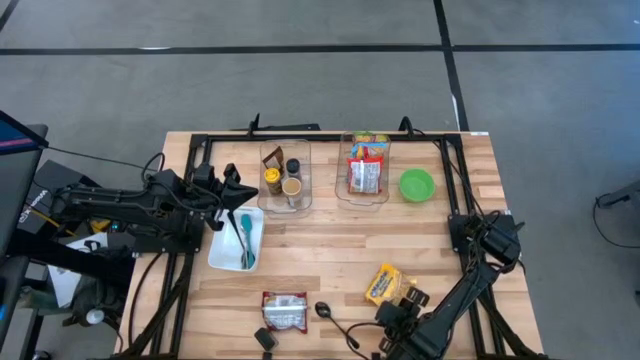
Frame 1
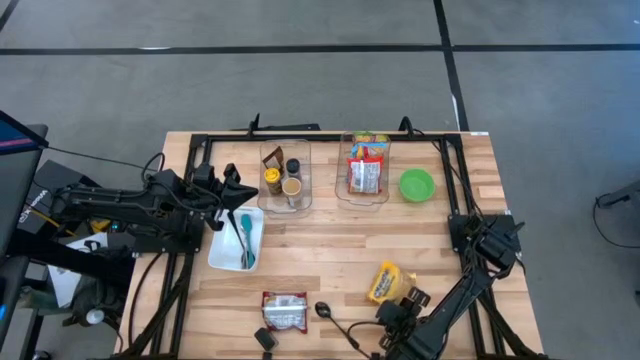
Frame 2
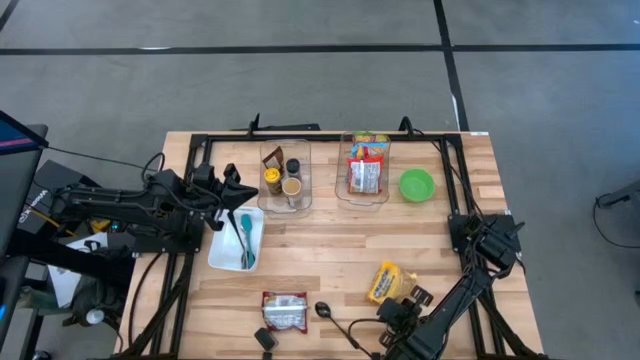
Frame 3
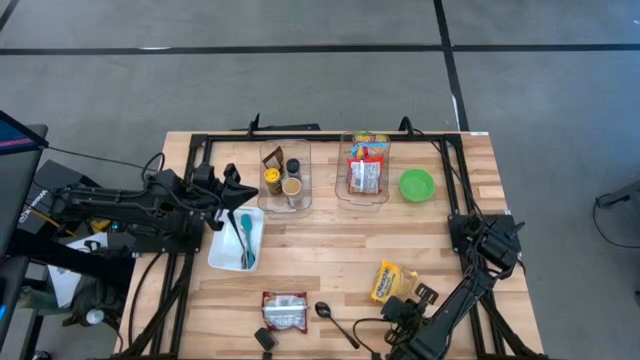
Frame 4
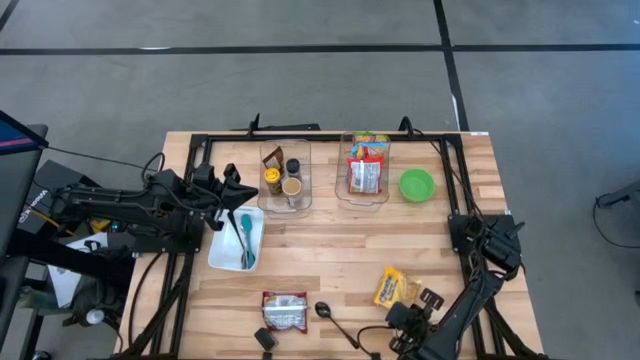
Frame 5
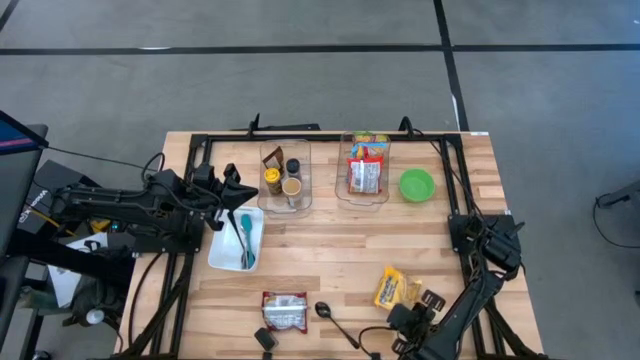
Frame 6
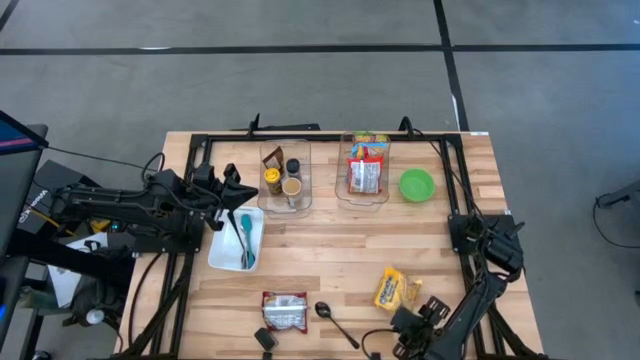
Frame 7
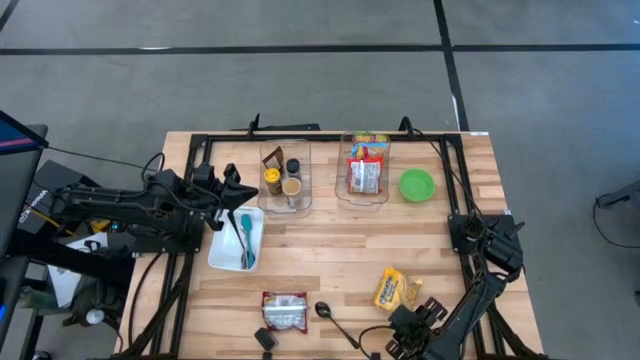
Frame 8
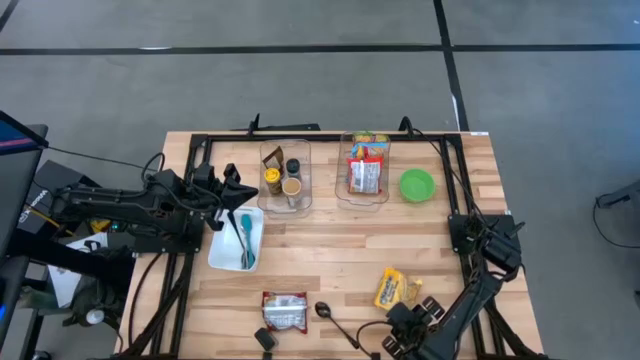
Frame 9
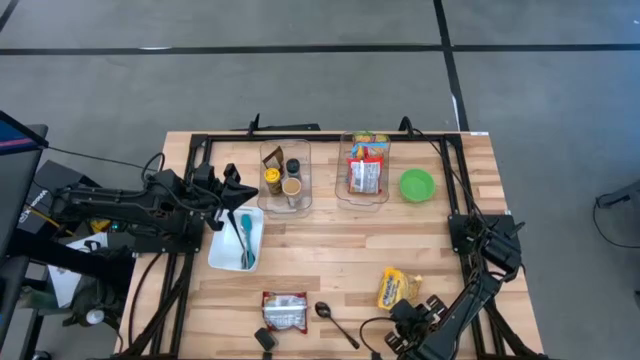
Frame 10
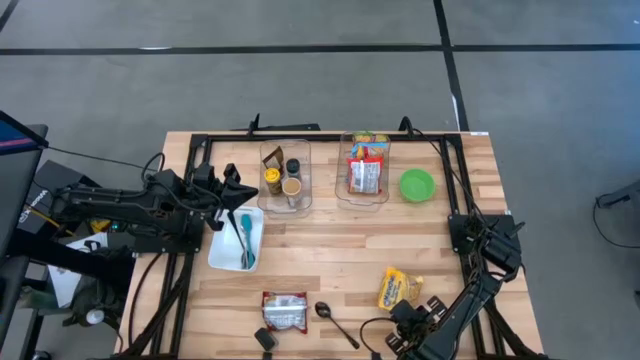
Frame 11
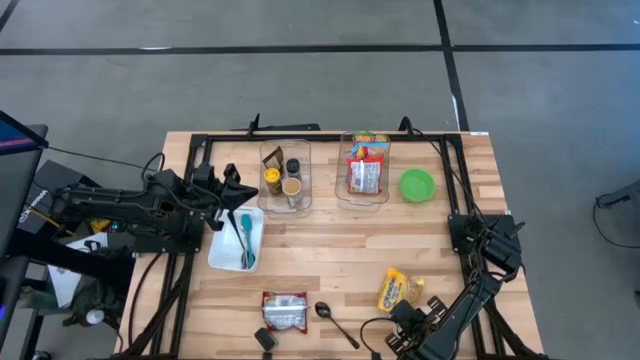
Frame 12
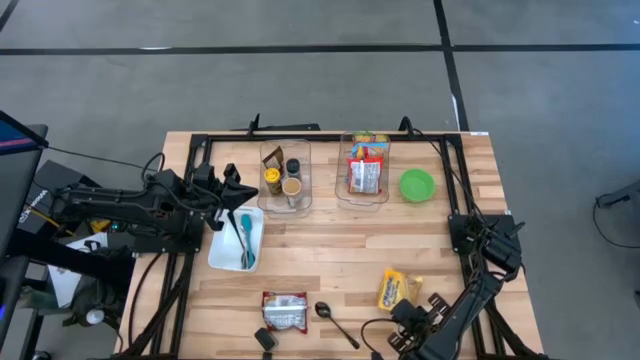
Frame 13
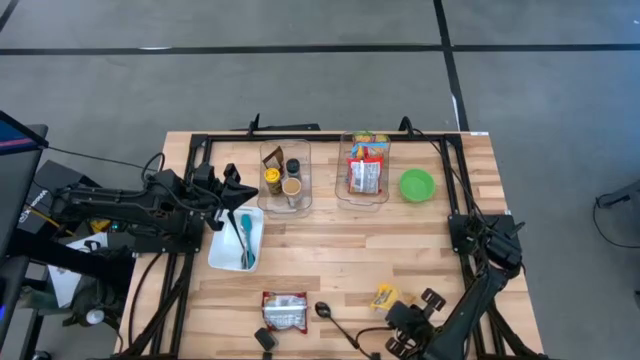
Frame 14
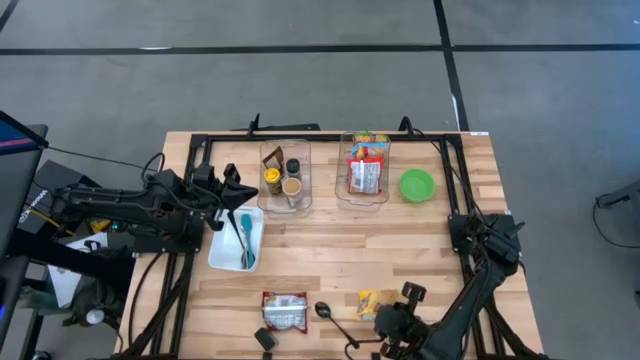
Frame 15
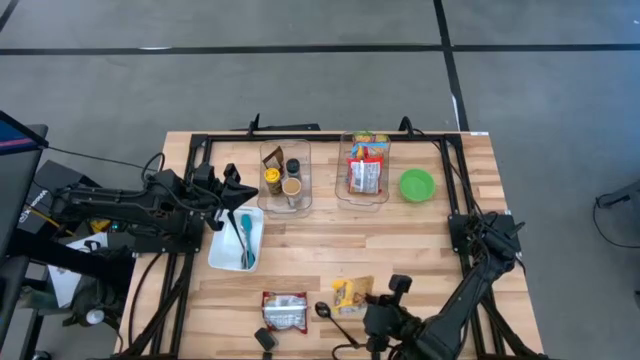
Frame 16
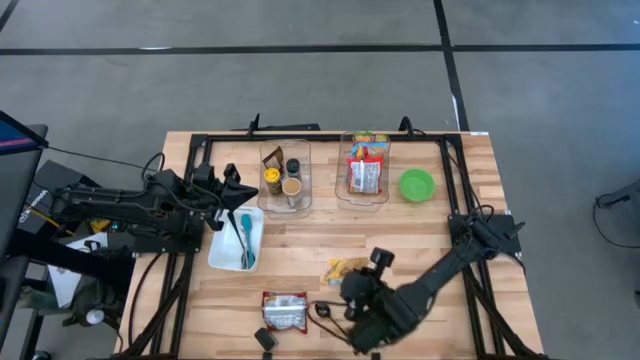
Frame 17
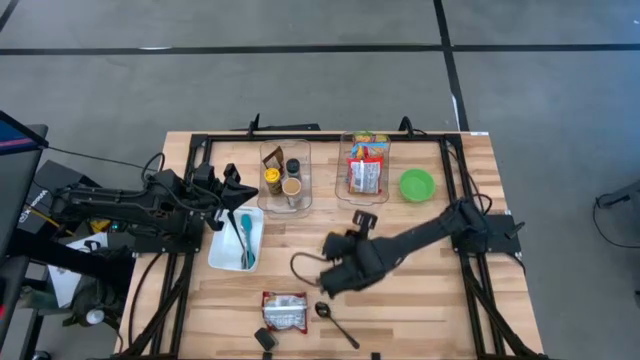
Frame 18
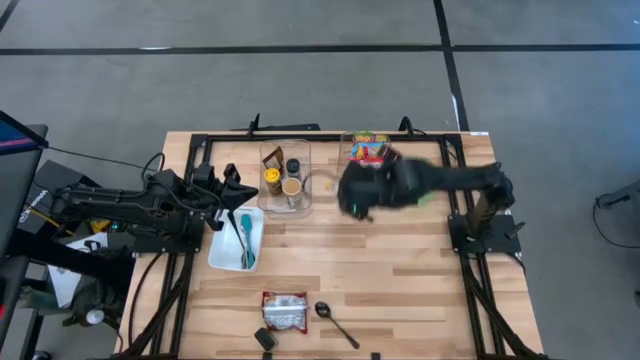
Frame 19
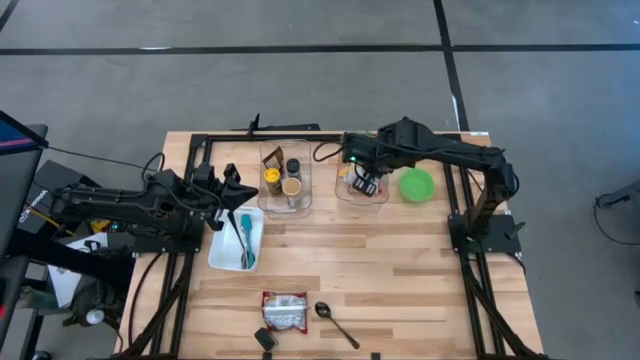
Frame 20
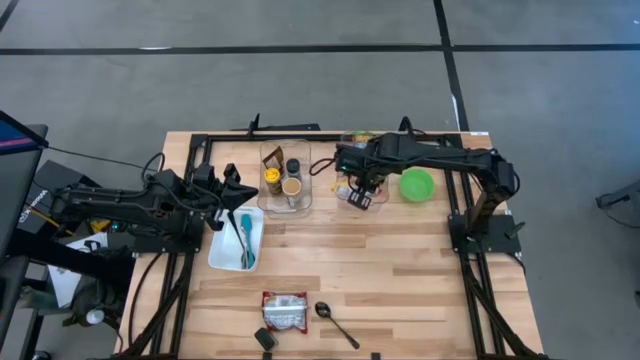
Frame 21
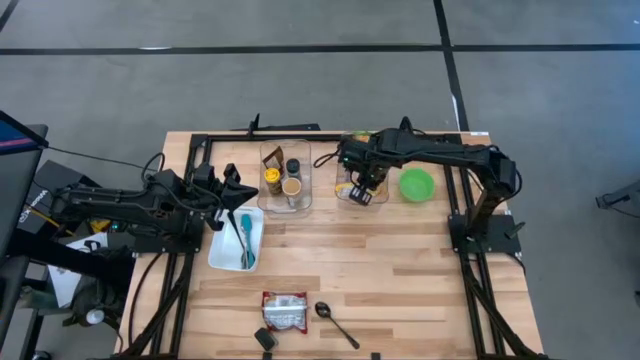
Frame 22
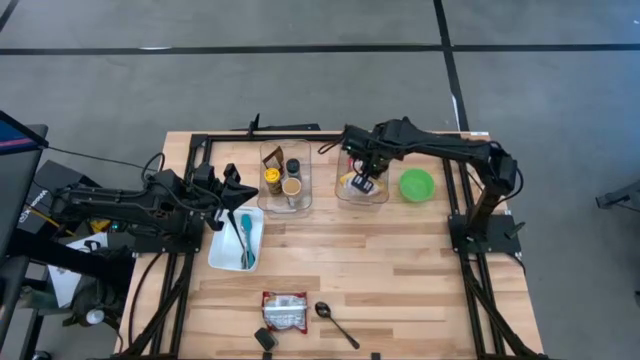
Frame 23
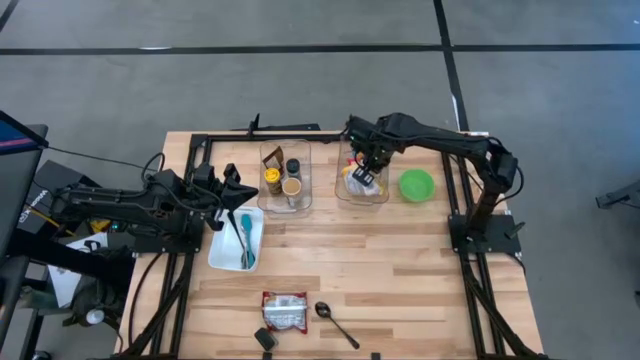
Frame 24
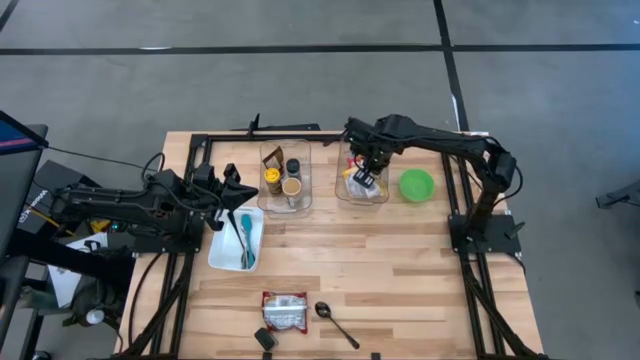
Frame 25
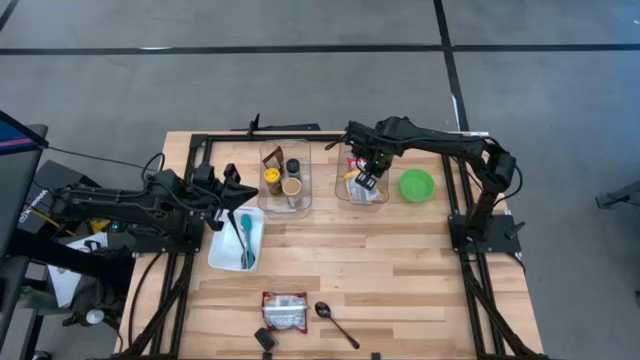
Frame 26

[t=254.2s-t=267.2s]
Task: Pick & Place Food Item
Put the yellow noodle pack into the right transparent bin

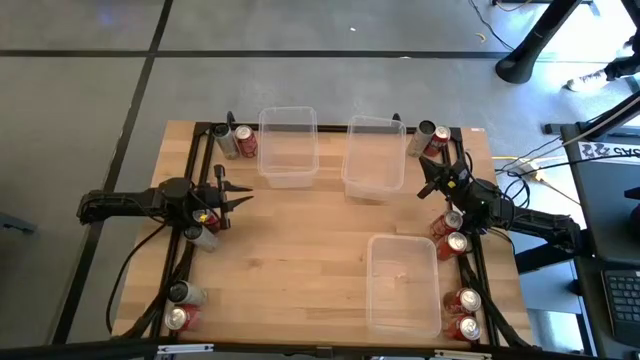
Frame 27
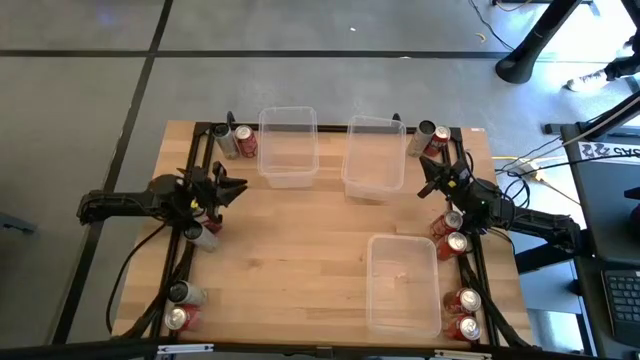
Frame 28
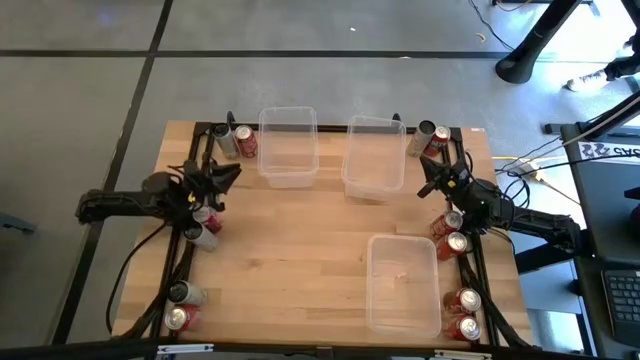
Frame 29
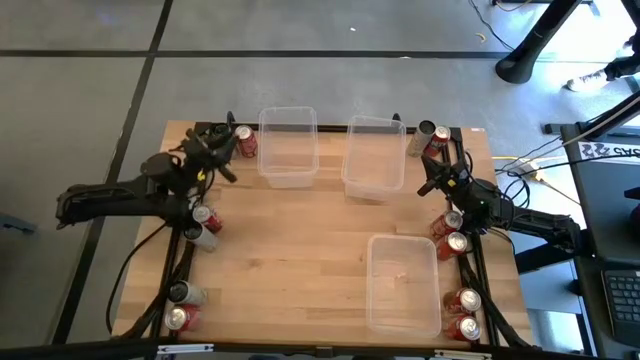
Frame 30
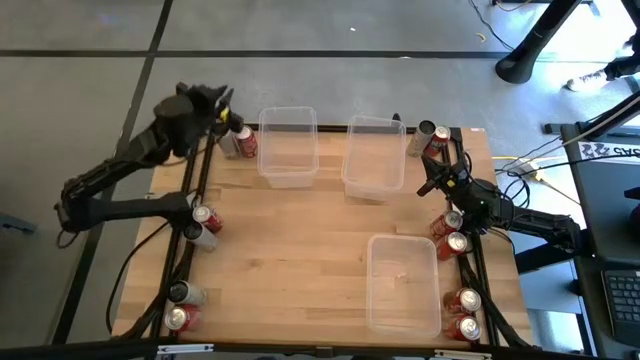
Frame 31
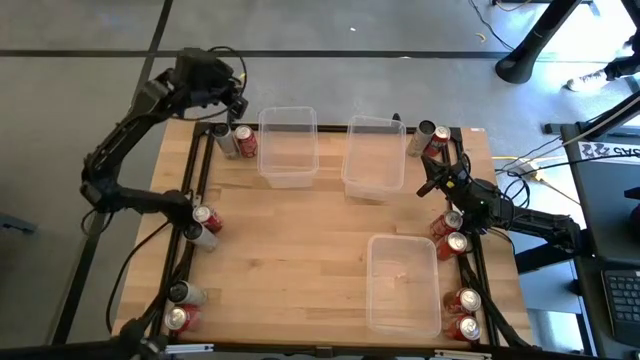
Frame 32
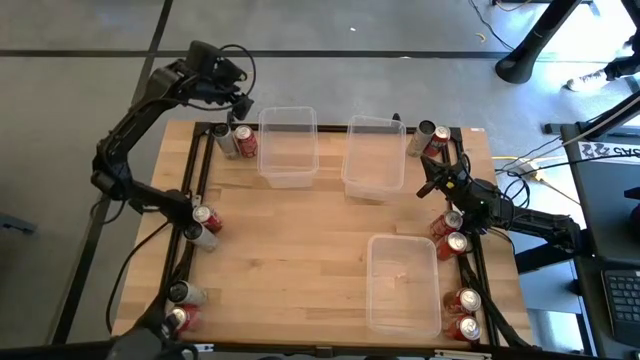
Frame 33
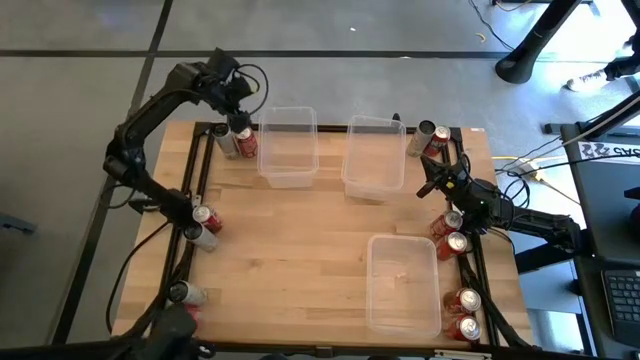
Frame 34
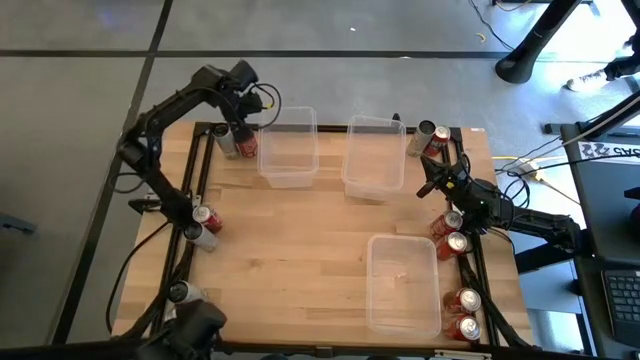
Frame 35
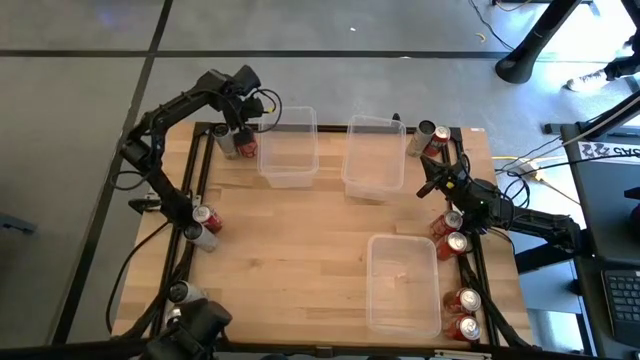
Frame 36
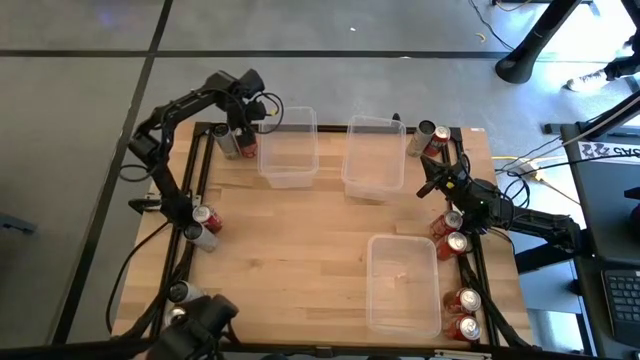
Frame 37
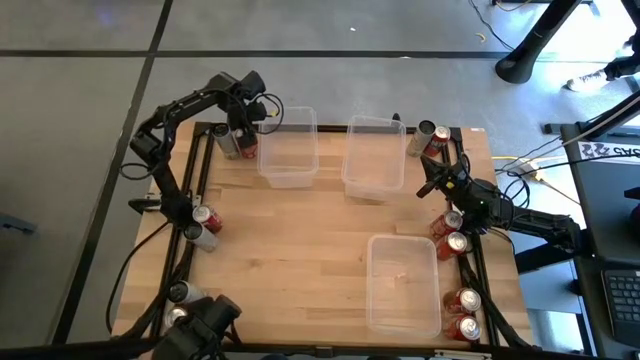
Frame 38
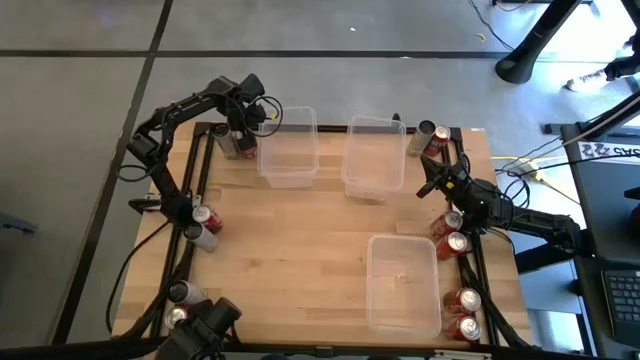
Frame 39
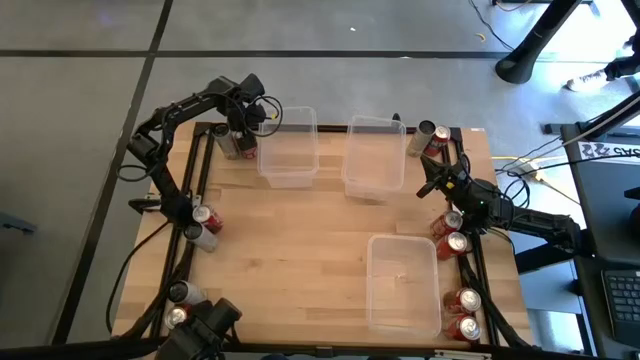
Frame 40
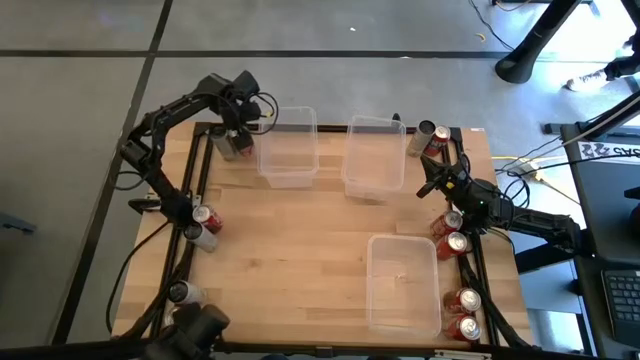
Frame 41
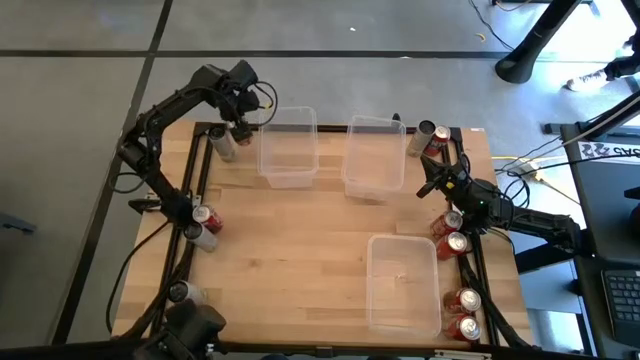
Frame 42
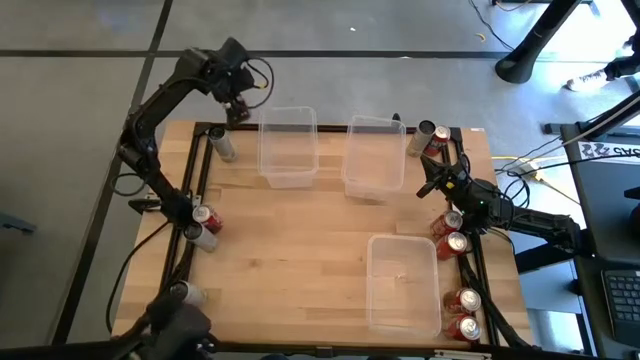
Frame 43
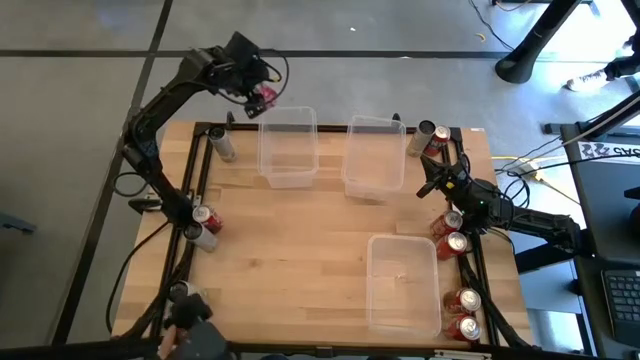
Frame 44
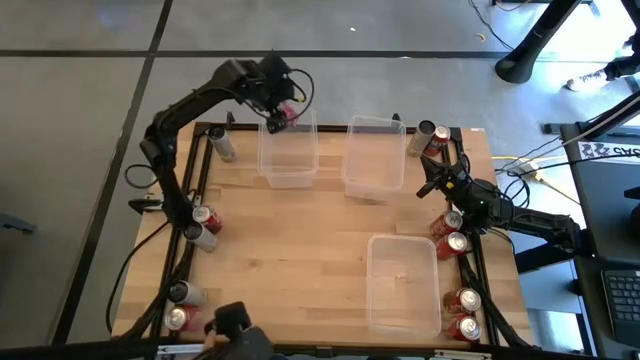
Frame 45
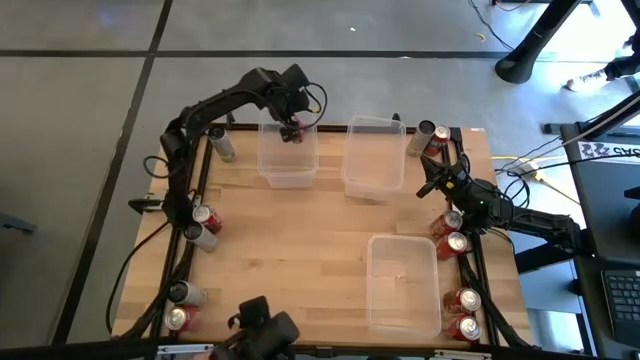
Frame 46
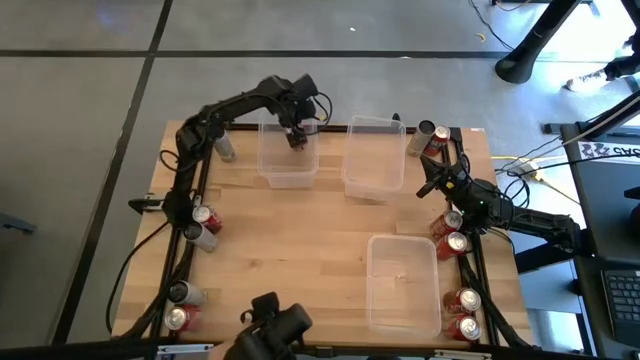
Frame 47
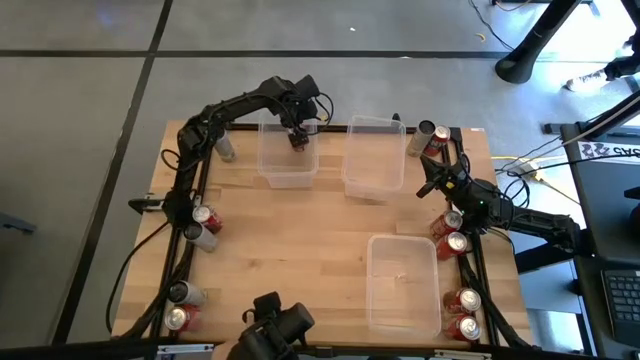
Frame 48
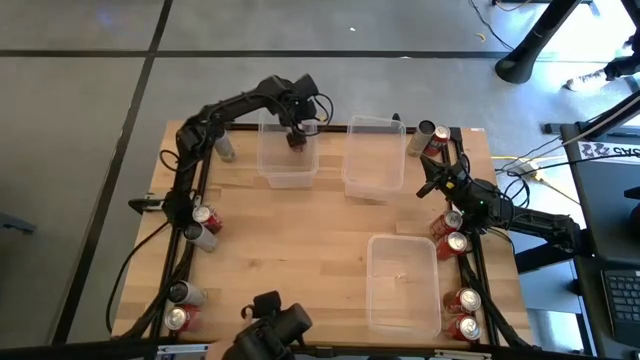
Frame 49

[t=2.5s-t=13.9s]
Task: Sort soda cans
Put the top left red soda can into the top left transparent bin
